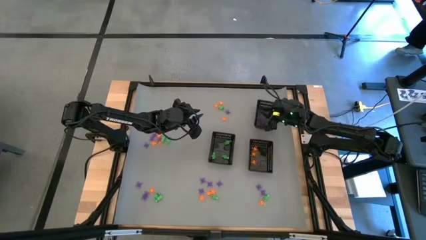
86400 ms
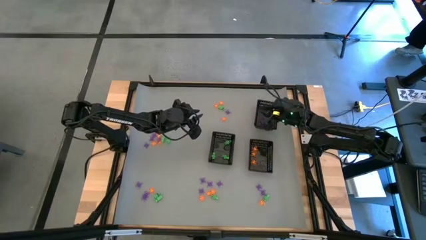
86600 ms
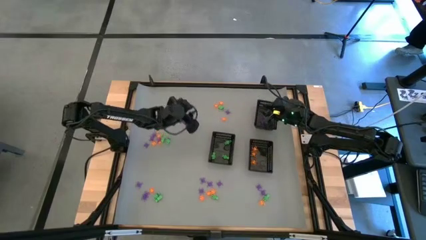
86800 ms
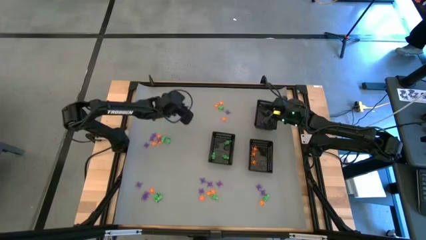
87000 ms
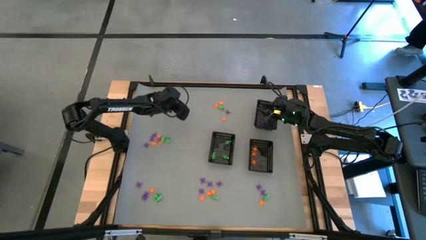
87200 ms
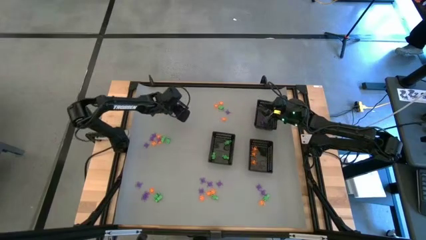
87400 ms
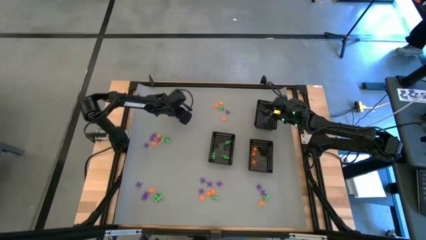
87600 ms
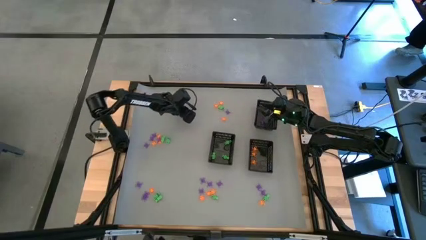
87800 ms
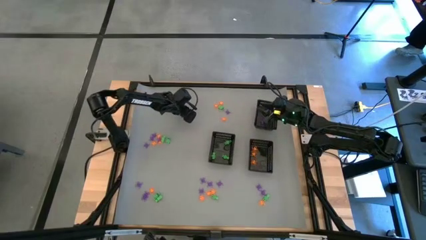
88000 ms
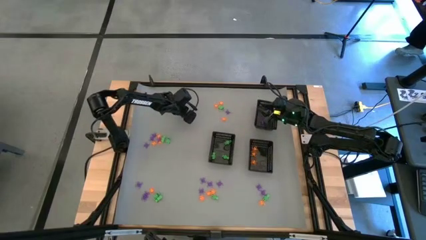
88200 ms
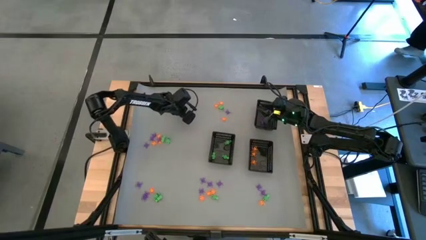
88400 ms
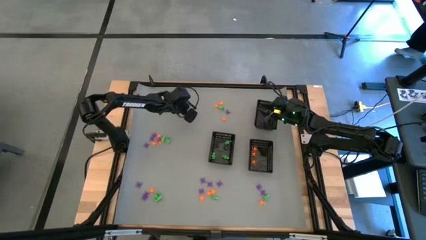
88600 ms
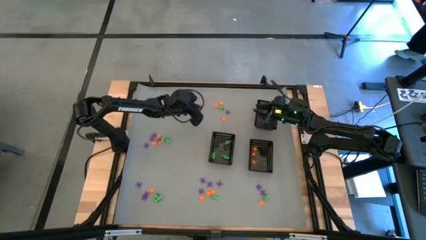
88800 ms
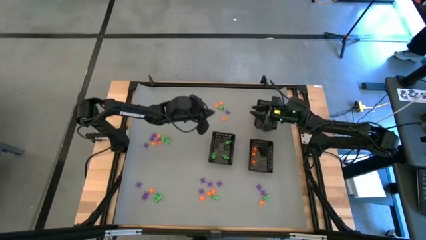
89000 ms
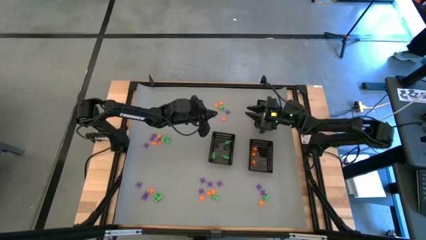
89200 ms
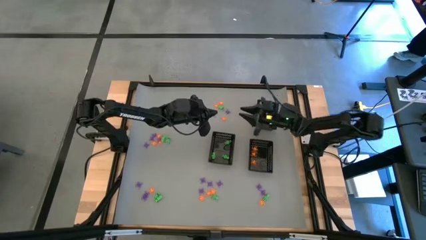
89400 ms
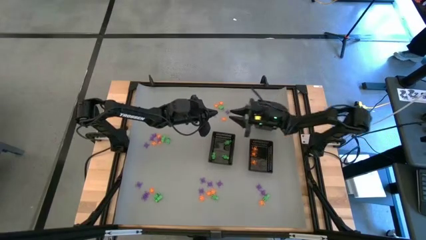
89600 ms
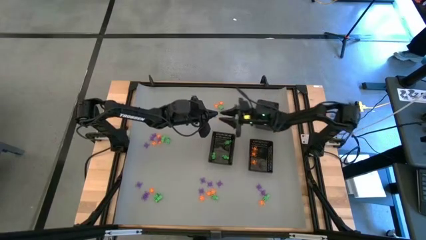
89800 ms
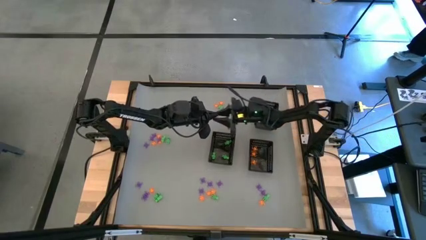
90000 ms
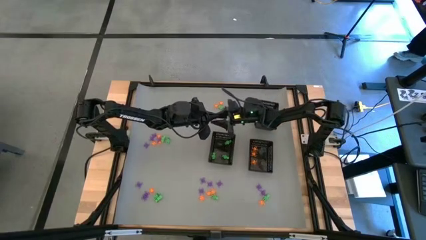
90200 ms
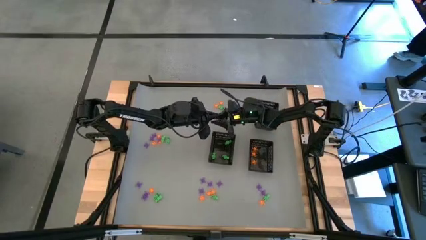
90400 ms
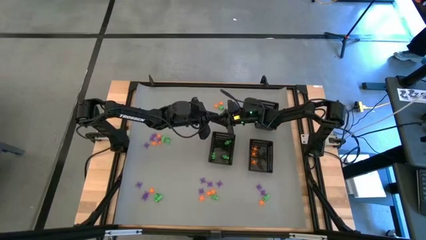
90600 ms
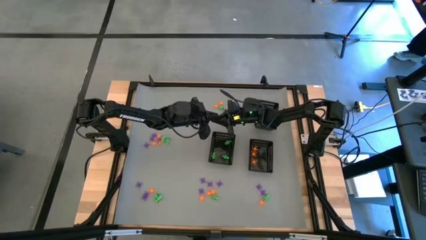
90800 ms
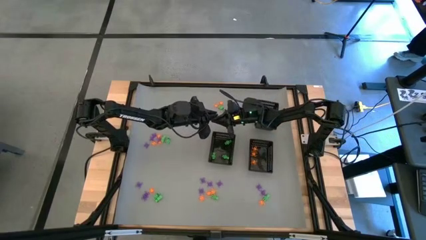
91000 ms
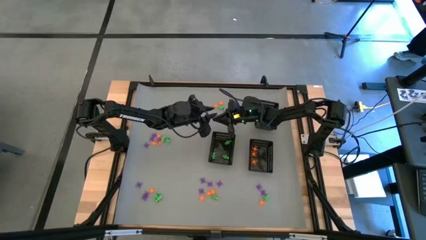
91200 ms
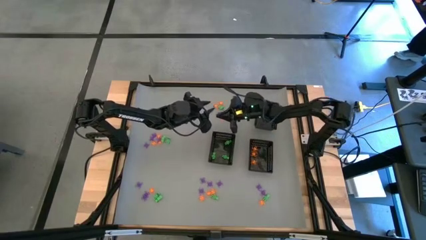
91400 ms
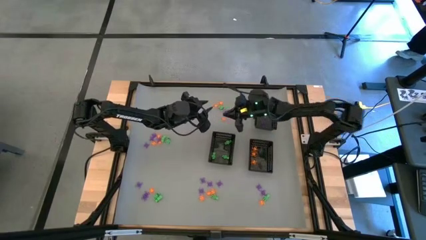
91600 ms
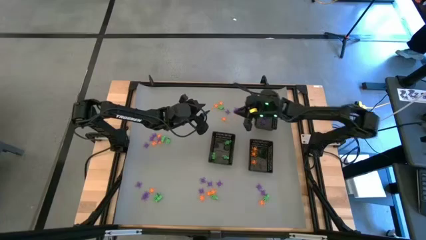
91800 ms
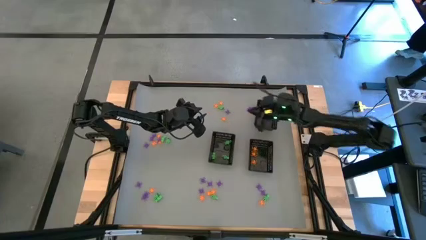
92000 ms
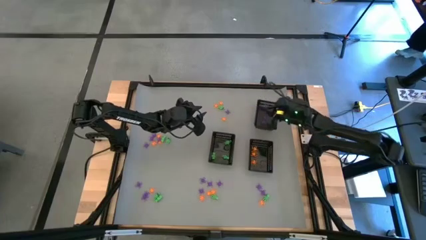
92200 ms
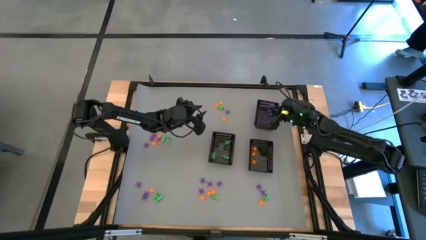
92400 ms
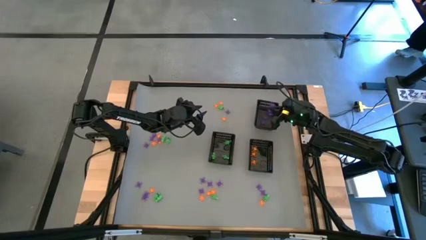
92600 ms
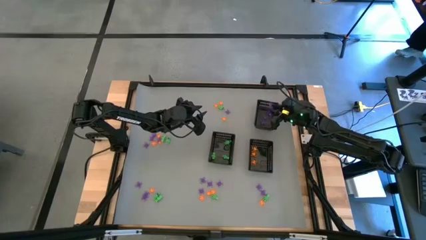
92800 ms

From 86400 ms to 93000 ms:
Task: Sort Halloween decoration
Put the purple spider toy into the top bin

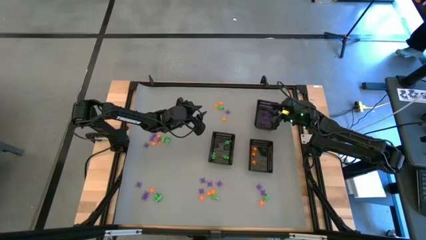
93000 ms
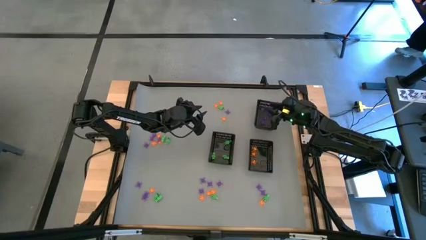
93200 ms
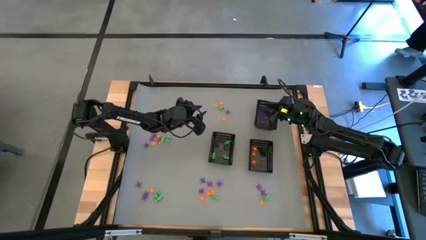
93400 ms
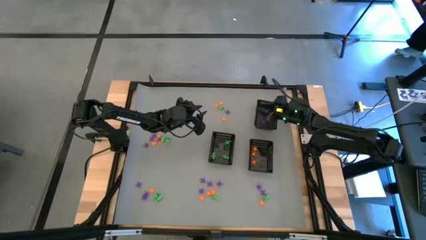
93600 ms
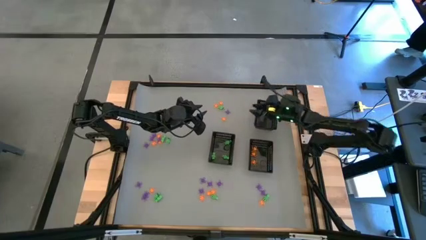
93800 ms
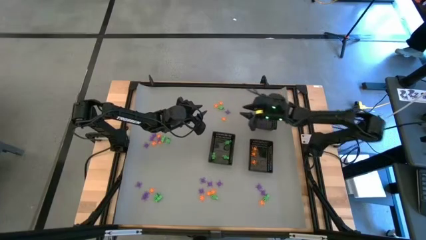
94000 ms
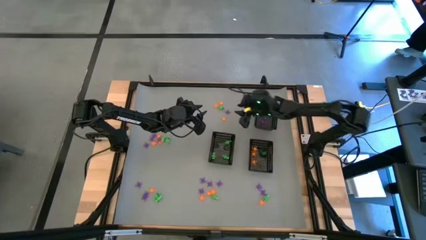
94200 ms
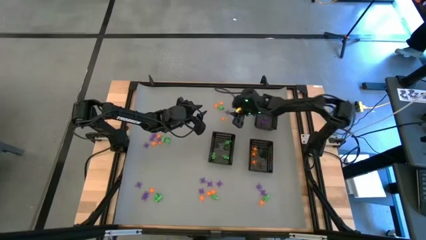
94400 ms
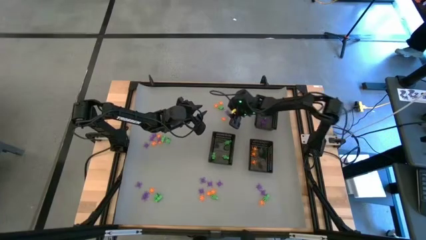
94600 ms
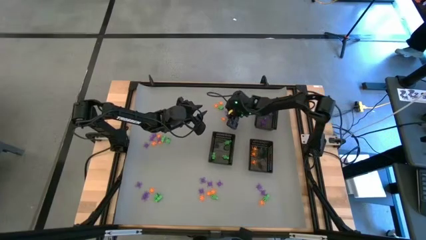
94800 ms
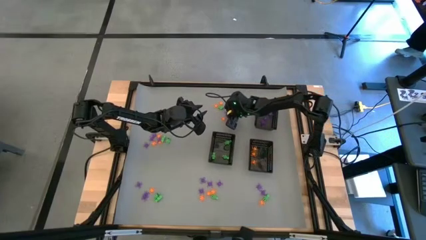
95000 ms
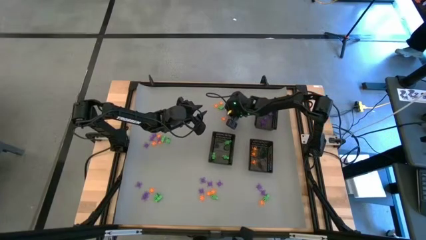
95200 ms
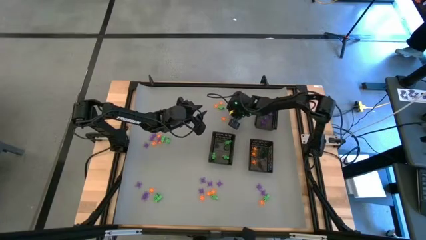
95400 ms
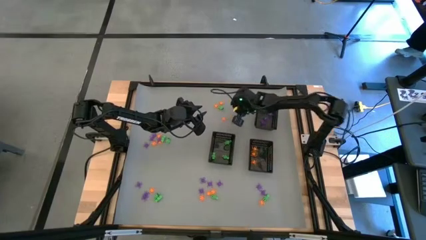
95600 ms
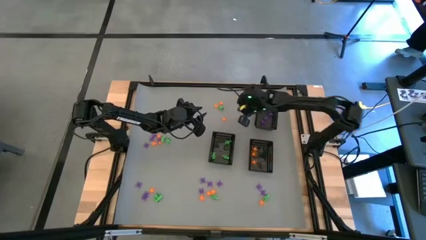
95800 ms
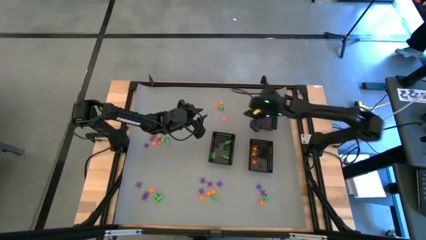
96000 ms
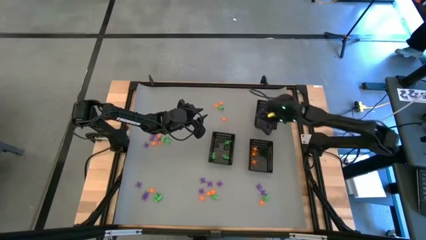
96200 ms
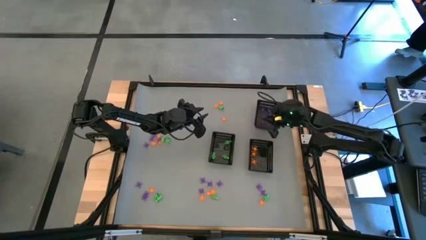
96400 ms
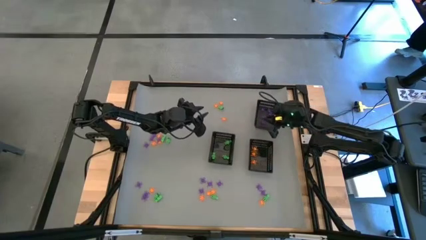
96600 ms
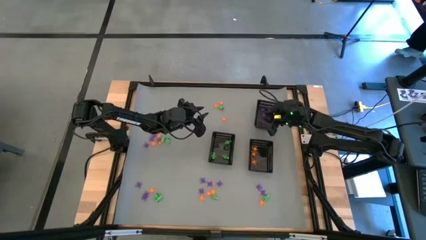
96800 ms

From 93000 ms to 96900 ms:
Put the purple spider toy into the top bin

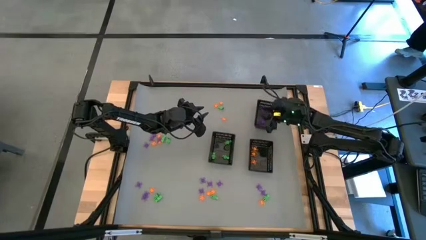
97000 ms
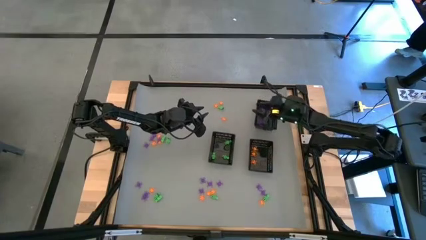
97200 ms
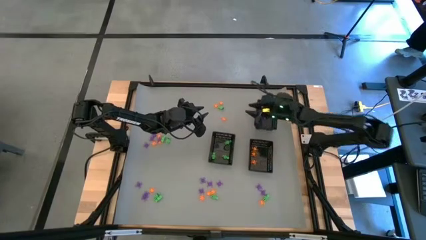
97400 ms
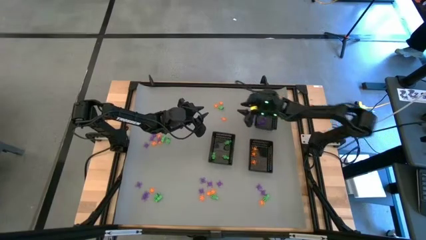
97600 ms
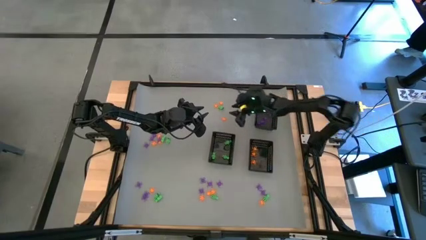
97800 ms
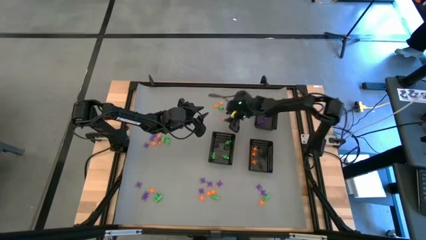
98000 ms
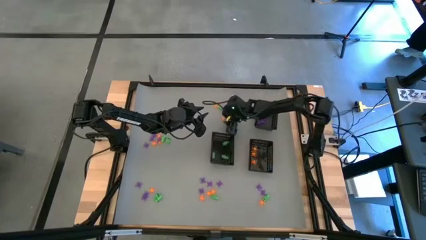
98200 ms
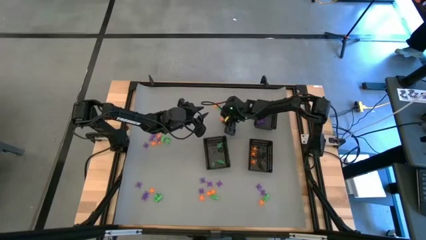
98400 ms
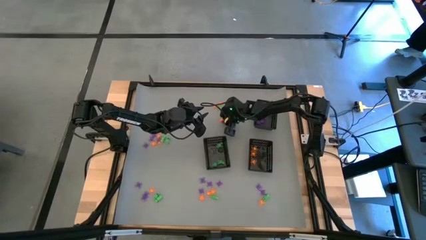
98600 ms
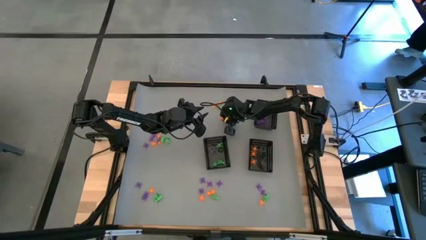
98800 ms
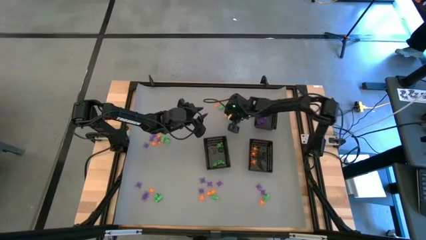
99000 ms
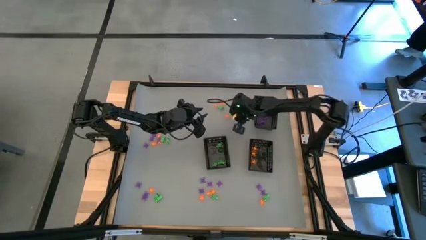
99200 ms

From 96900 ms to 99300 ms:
Put the orange spider toy into the bottom right bin

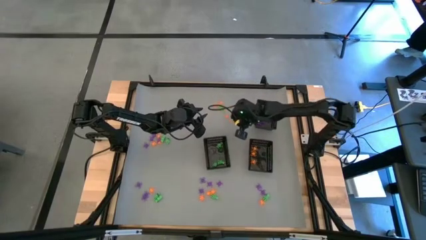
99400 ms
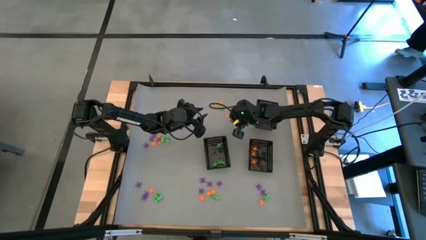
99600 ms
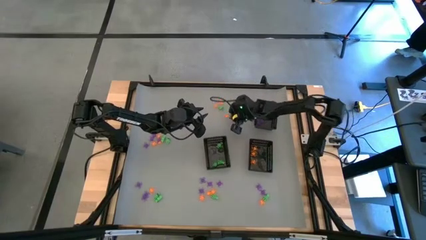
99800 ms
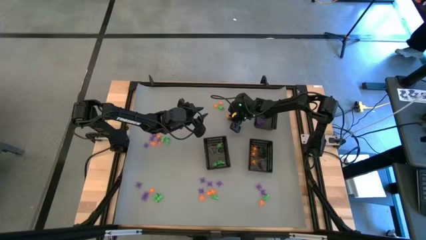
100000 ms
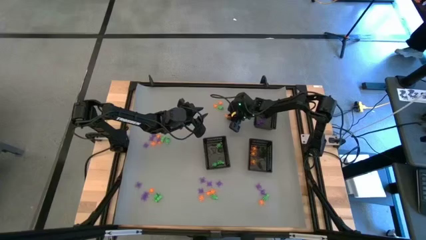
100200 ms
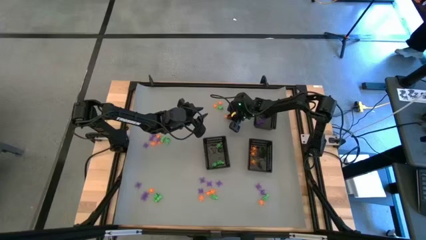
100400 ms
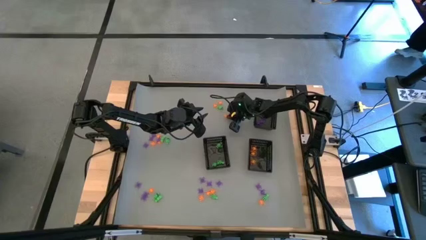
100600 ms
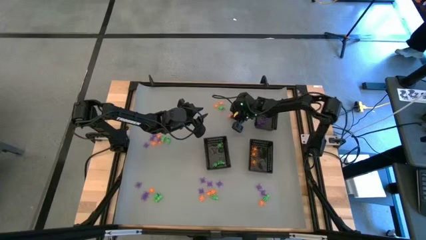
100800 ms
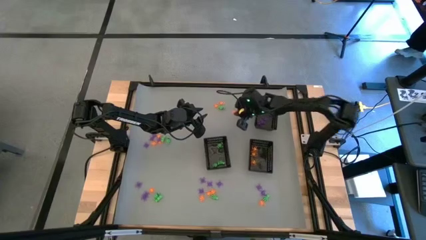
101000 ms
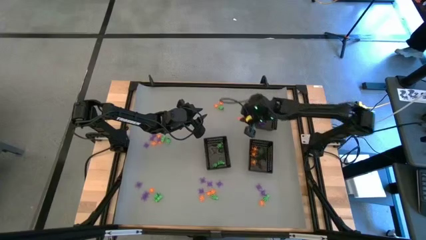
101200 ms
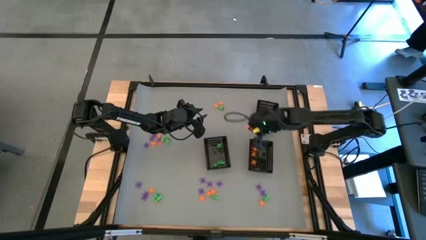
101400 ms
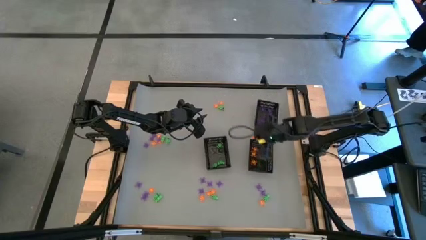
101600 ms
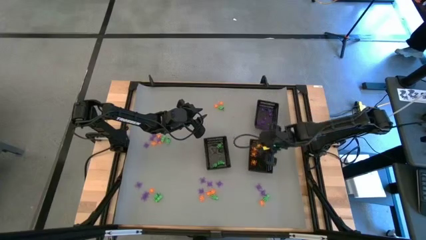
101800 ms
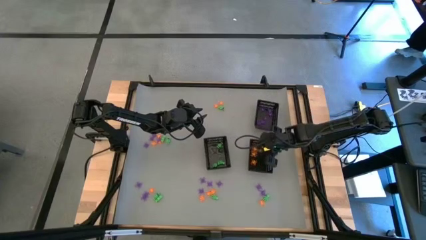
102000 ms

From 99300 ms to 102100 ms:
Put the orange spider toy into the bottom right bin

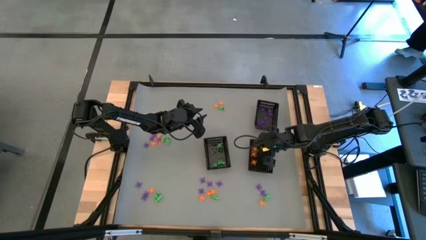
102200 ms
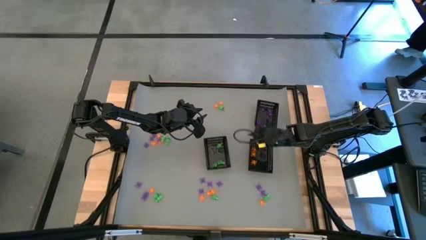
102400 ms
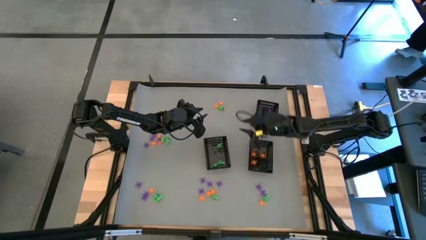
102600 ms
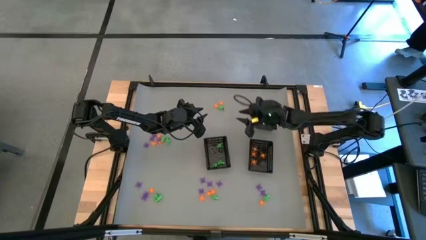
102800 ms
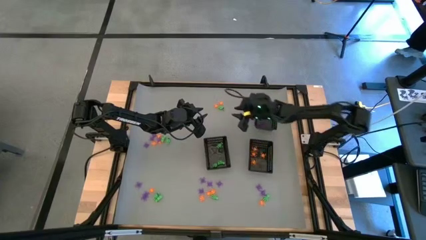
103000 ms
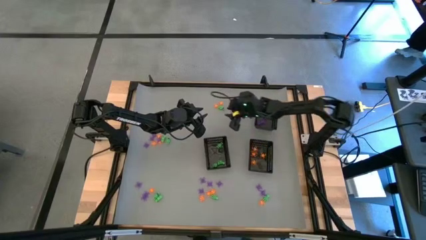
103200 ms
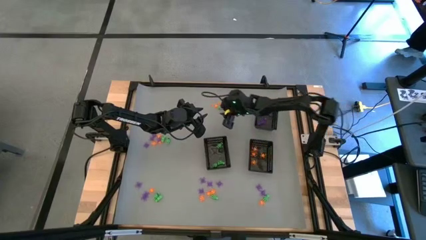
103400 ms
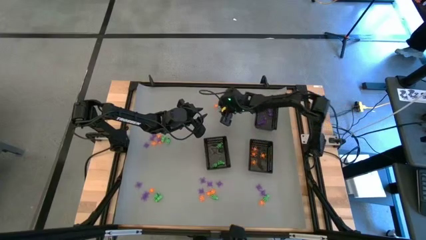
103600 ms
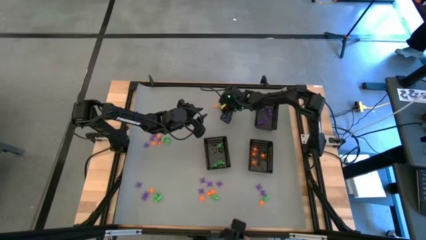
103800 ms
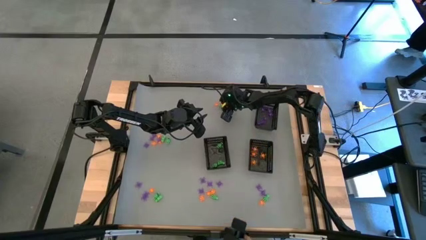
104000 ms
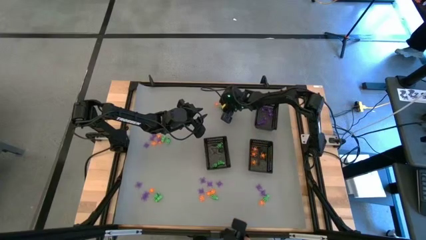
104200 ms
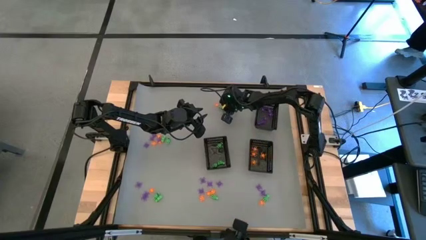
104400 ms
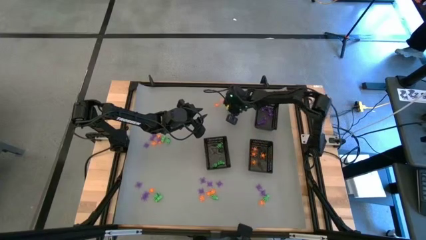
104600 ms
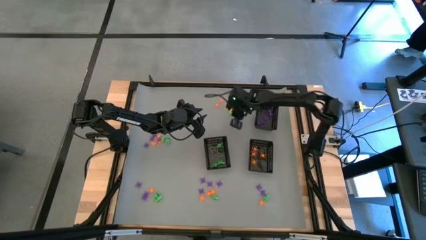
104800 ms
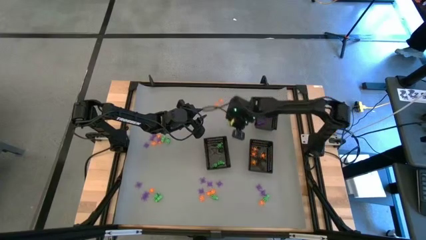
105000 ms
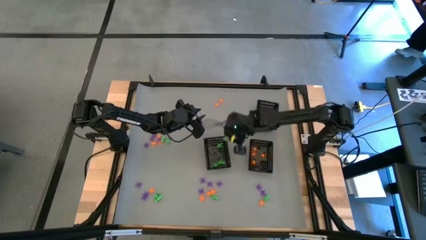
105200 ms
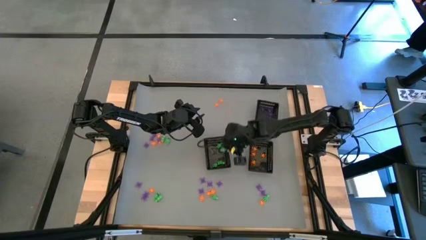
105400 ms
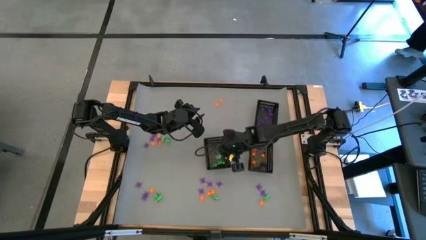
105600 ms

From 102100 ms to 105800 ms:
Put the green skeleton toy into the bottom left bin
